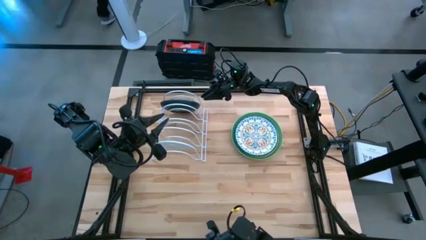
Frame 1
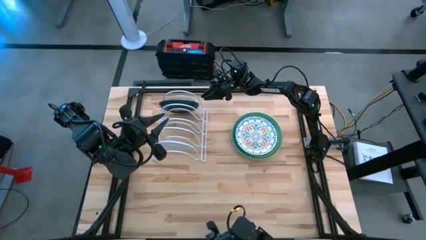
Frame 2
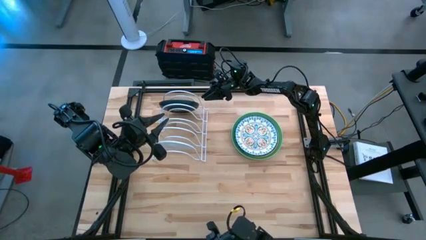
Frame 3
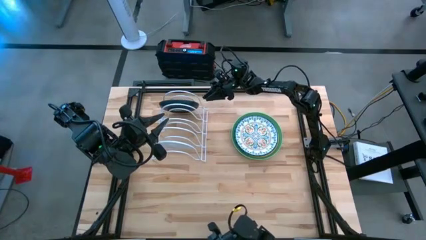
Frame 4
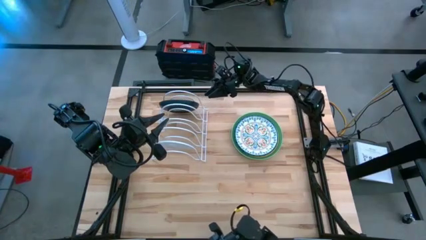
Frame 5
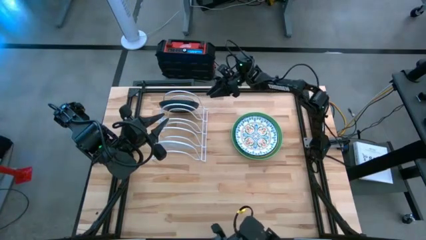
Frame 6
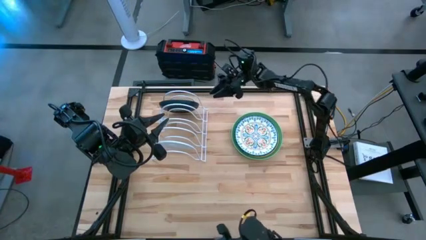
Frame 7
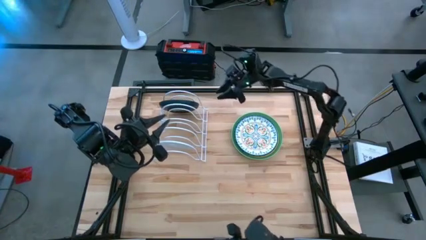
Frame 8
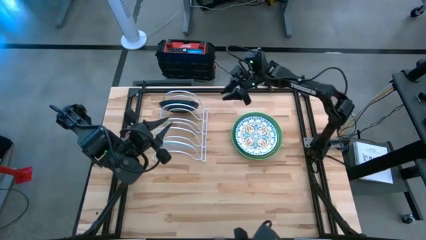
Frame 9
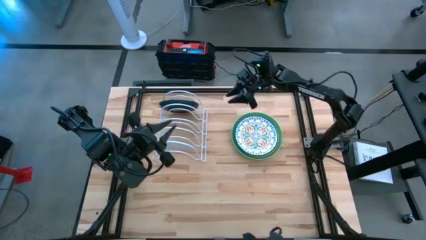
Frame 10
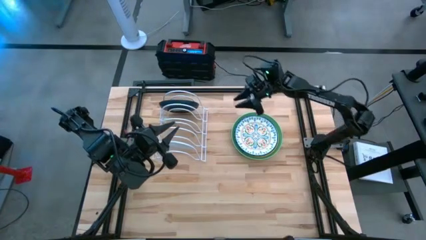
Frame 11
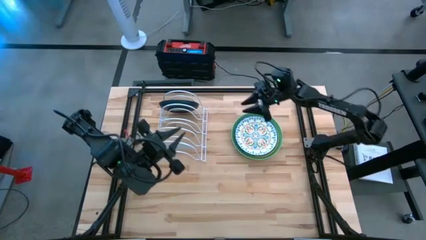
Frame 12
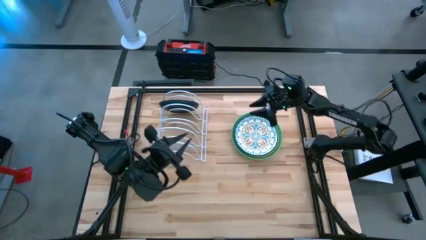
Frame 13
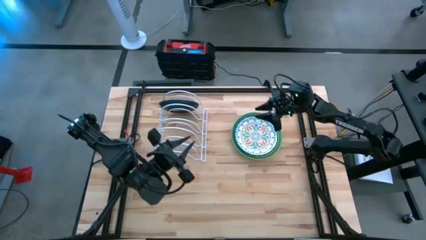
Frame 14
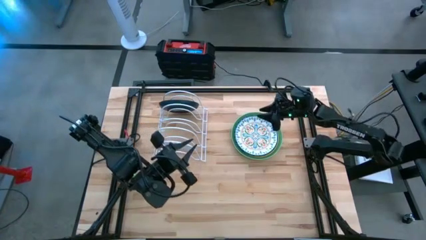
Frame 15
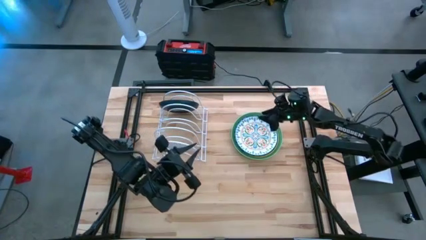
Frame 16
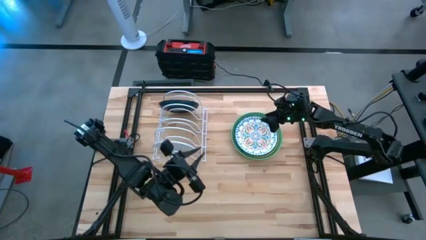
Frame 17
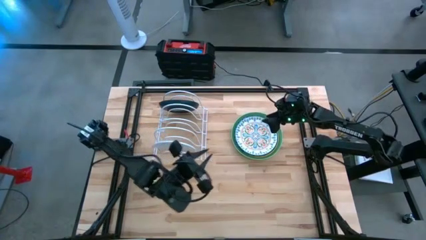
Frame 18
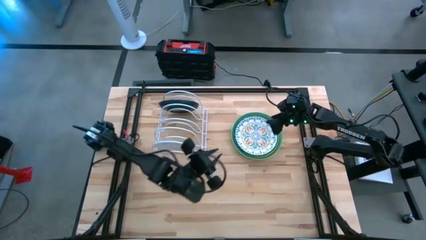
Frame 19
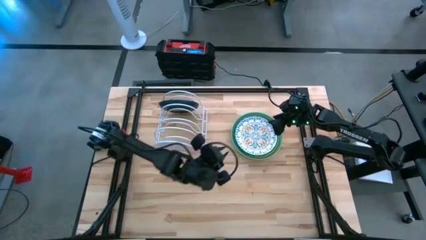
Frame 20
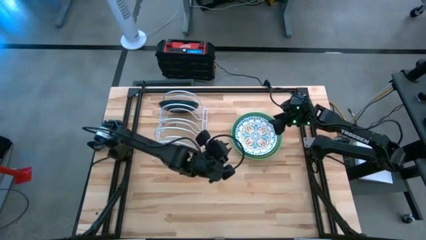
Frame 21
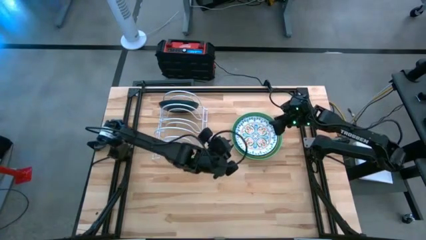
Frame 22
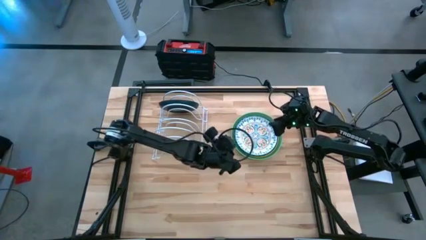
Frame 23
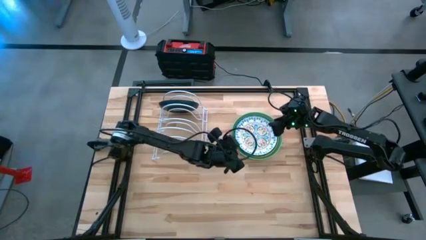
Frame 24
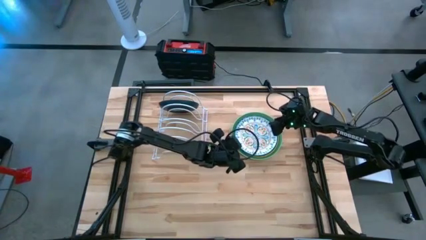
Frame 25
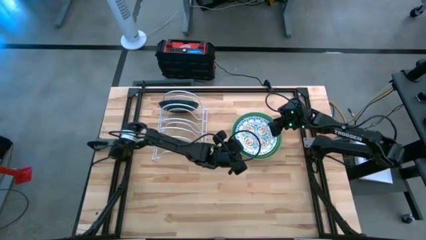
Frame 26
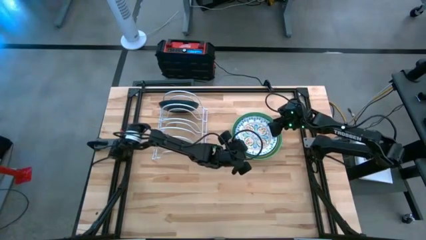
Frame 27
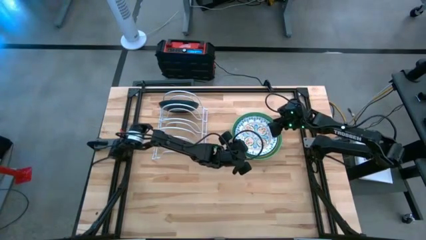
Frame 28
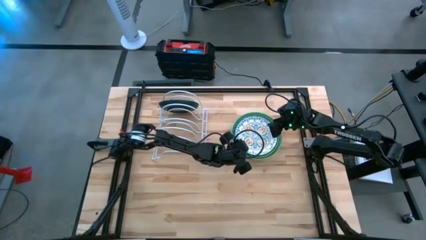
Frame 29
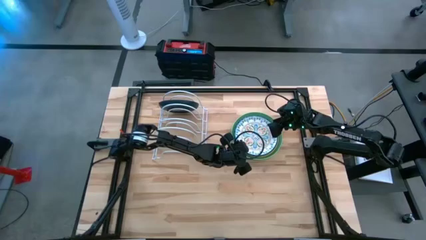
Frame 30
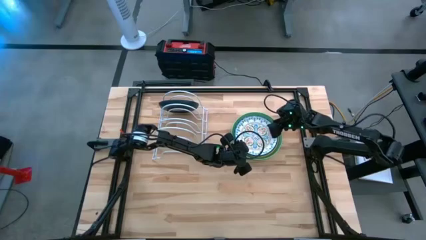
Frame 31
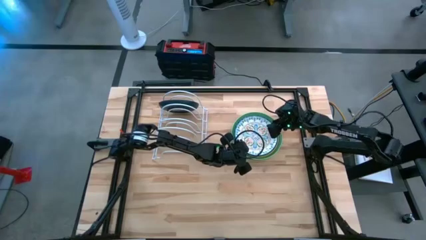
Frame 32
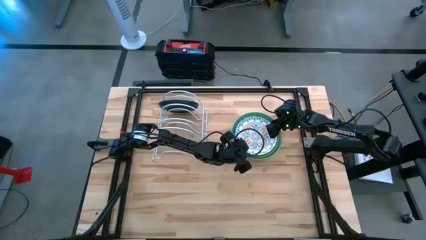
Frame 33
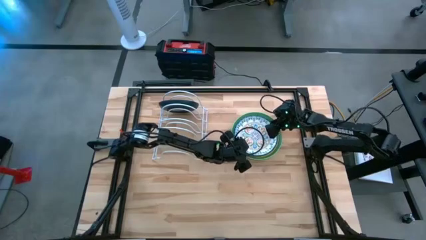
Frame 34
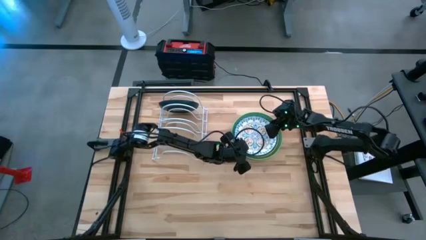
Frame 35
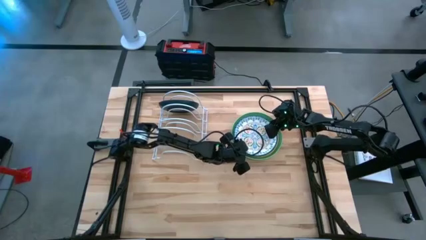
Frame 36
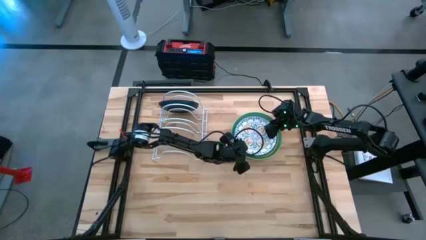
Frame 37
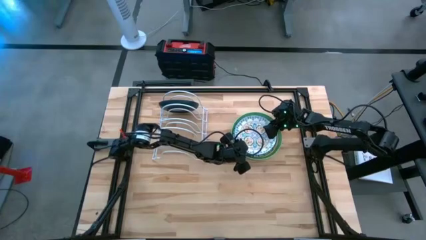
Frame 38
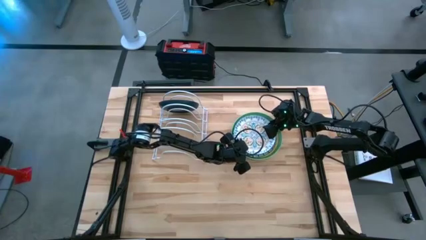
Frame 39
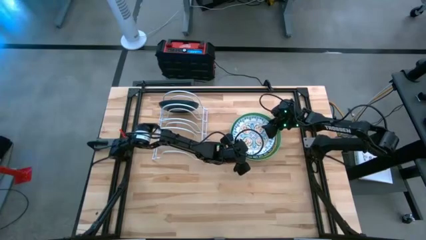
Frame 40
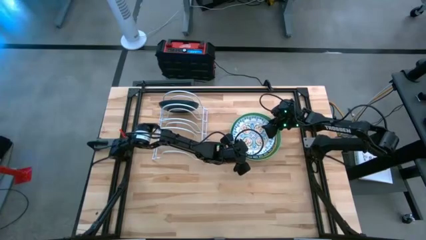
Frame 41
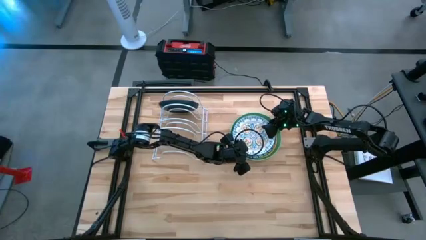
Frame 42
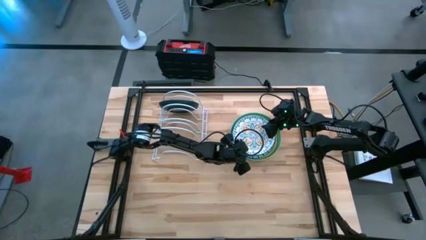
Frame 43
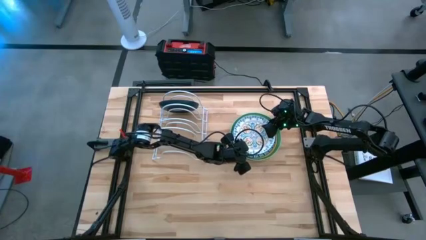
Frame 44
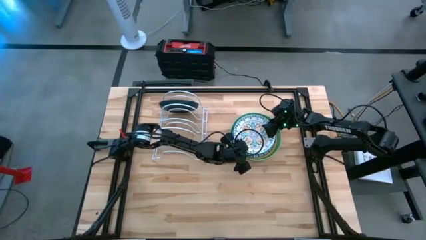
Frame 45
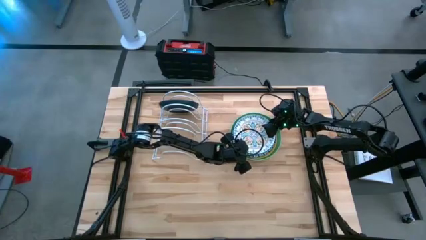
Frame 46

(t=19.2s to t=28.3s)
Task: Sort dishes
Put the white pattern plate in the dish rack

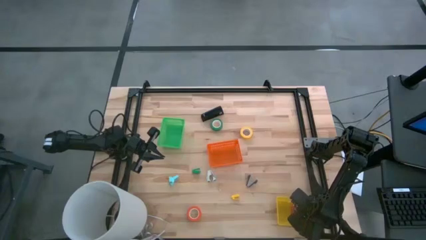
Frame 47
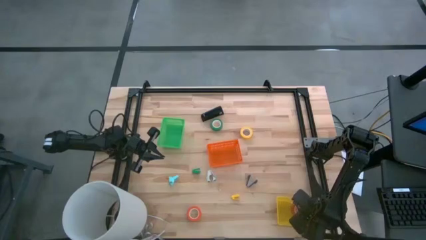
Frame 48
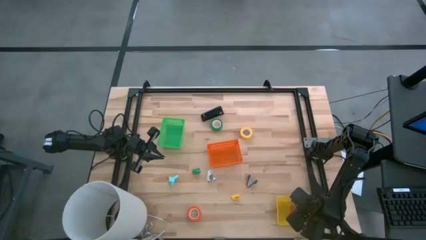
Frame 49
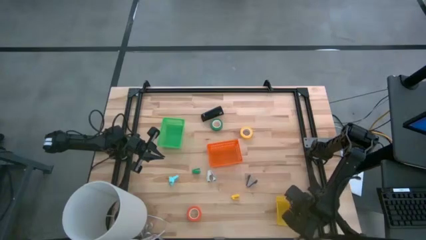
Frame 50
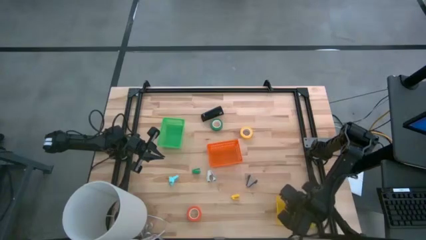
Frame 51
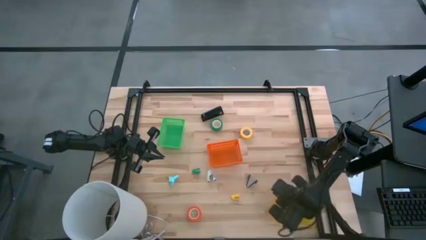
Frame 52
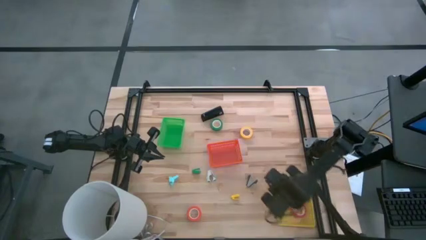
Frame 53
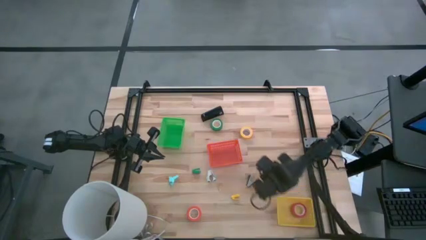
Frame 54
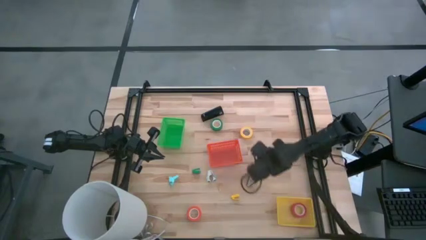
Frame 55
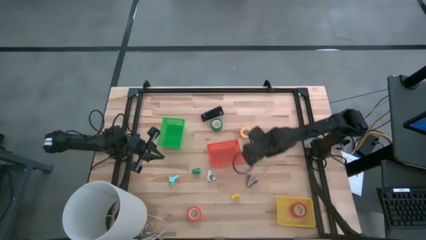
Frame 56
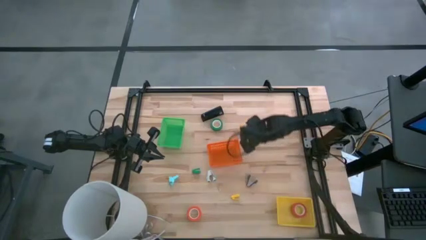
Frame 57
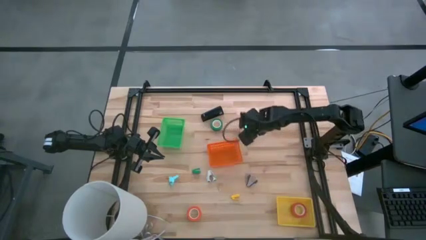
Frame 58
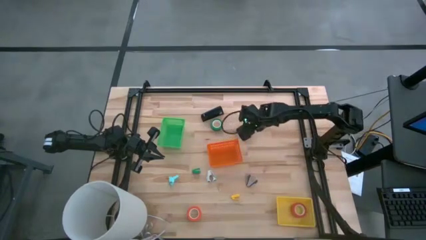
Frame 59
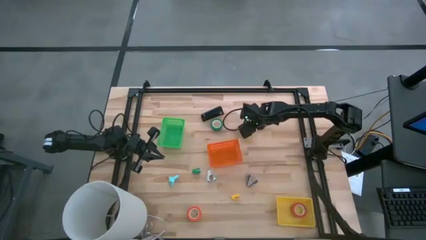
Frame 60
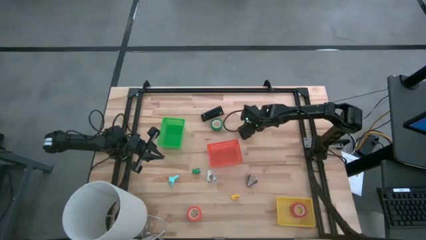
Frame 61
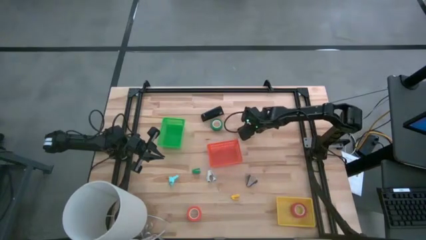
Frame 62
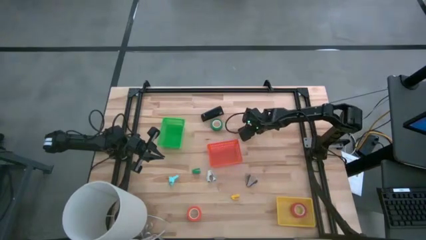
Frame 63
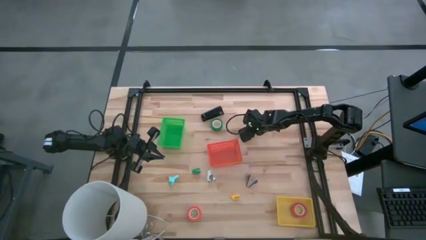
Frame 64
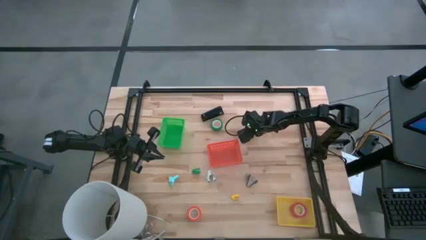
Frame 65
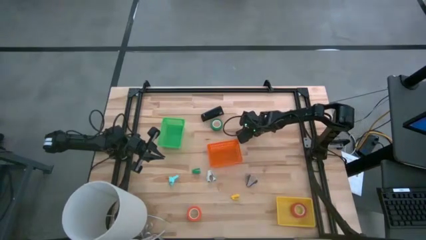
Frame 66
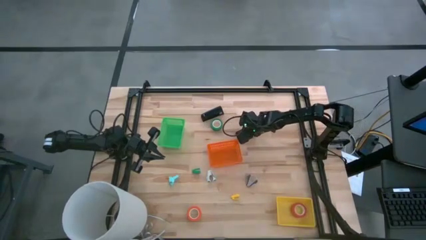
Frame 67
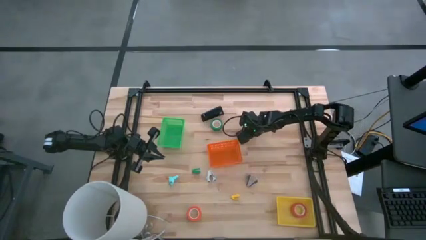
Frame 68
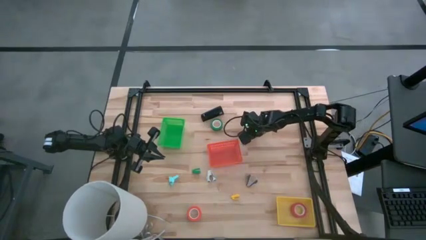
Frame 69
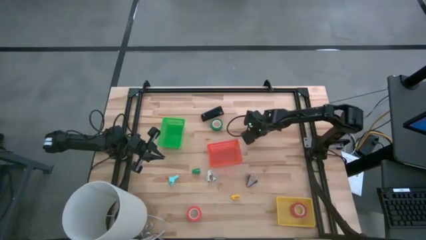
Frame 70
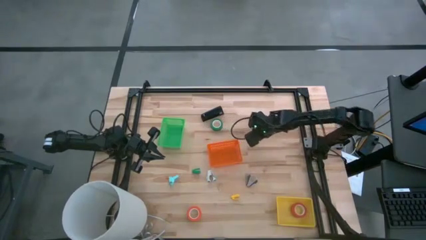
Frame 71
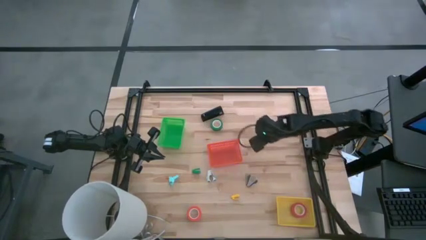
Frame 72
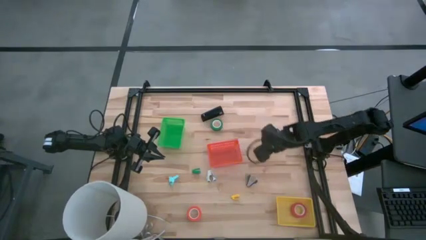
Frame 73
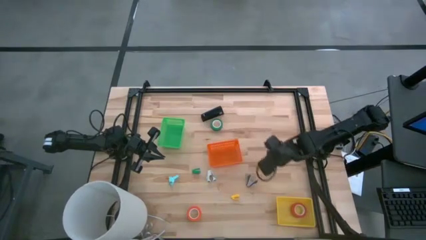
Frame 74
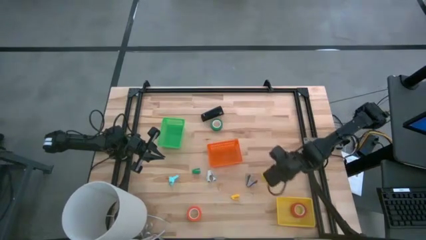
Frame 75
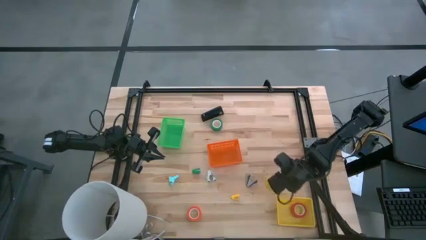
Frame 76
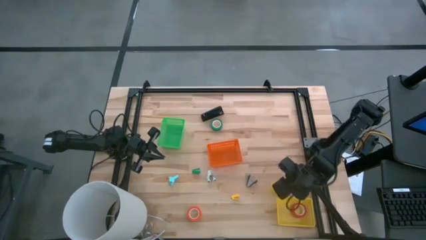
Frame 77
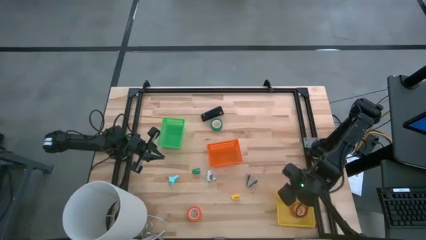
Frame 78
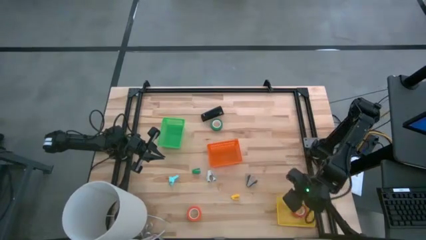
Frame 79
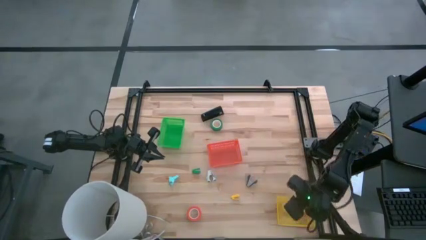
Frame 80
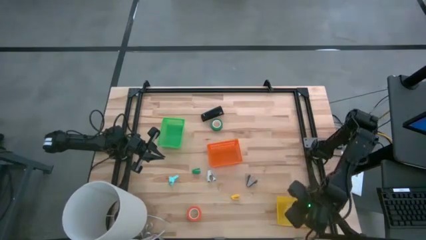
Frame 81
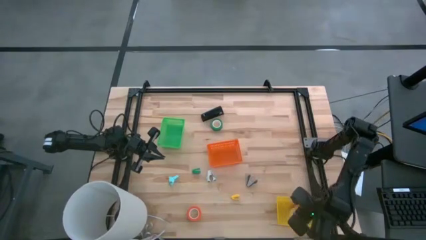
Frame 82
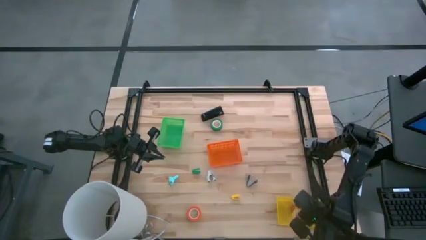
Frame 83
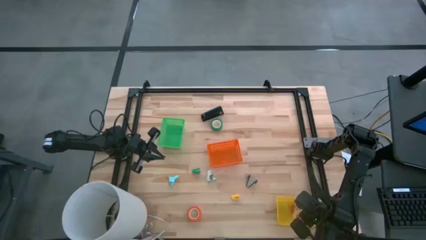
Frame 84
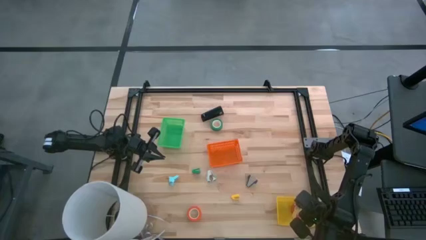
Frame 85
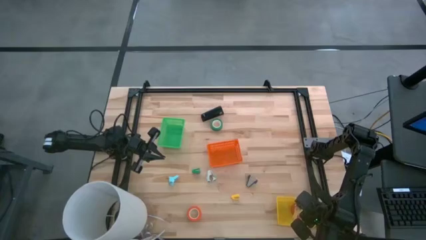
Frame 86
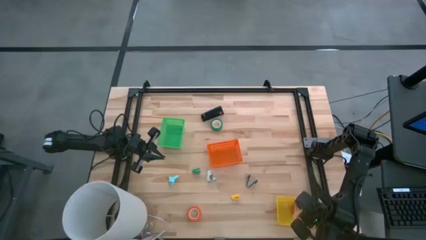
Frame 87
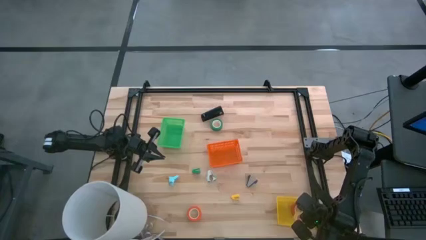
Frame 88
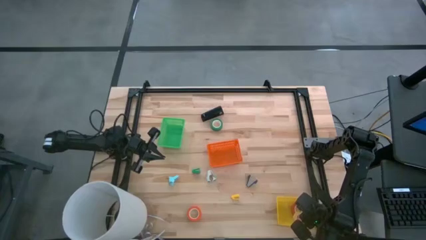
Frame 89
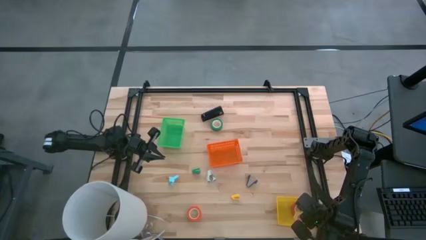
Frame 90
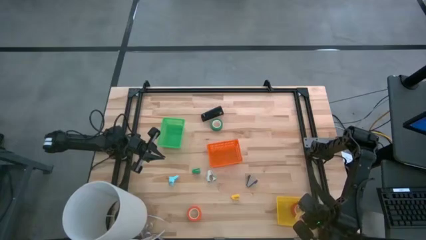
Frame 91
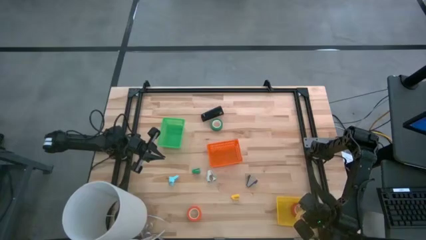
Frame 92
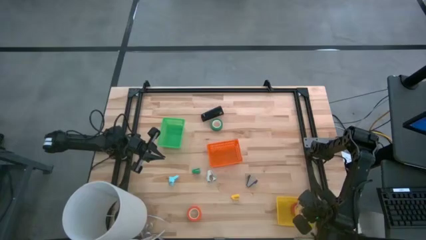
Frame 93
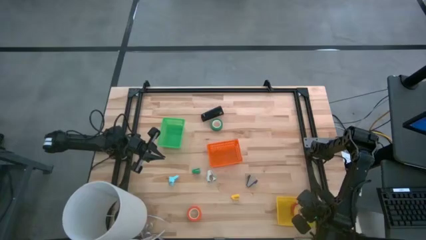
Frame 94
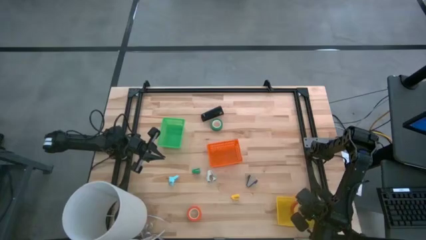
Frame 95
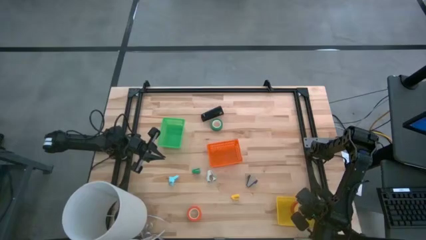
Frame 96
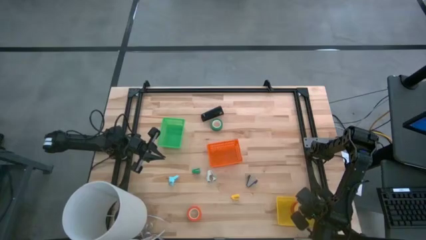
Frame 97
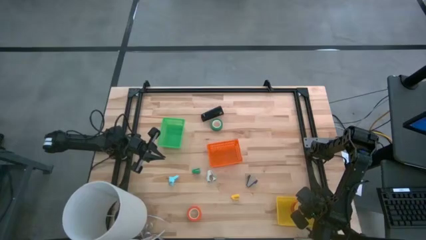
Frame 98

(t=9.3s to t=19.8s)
Task: Pick and place Stapler, Stapler remover, tape
Put the yellow tape into the yellow bin
